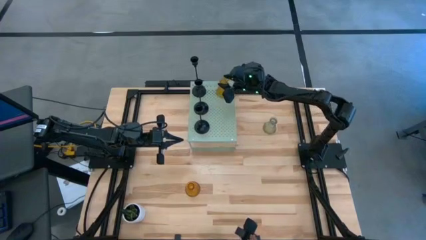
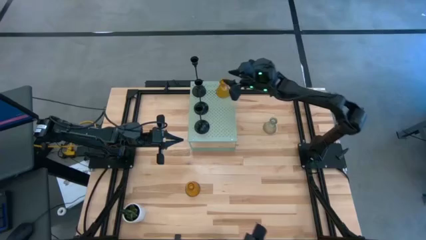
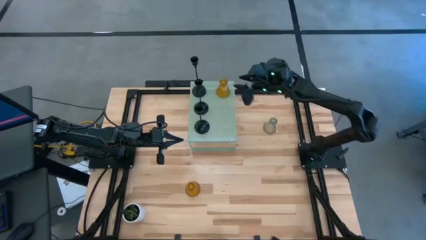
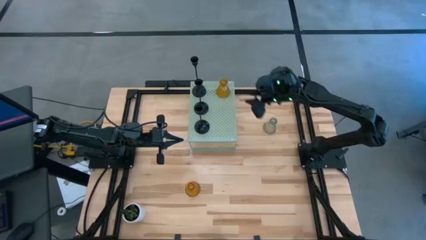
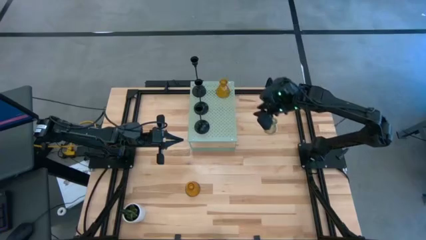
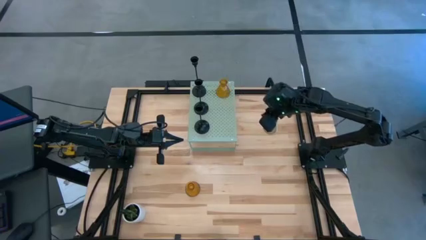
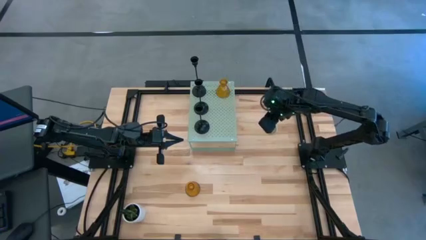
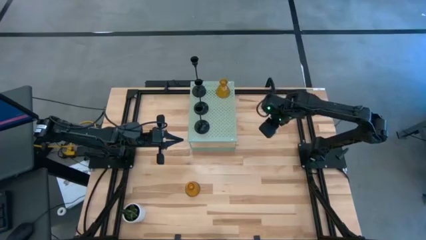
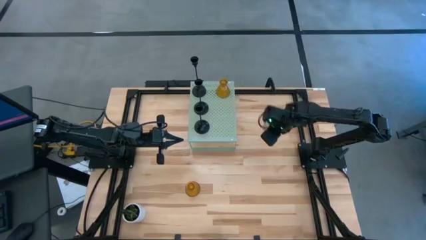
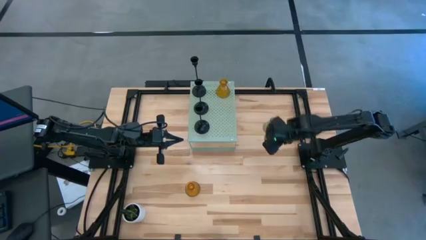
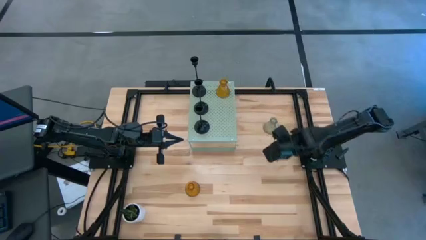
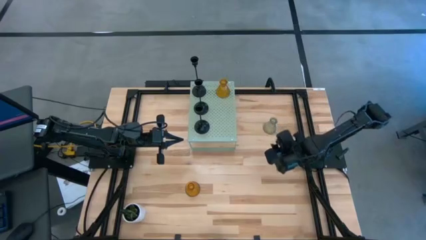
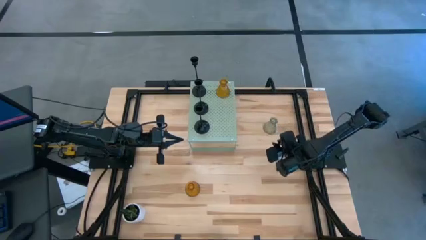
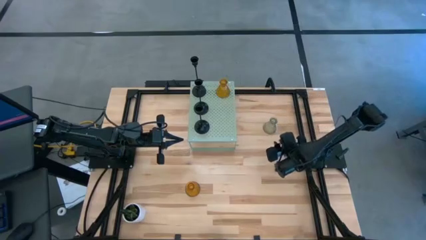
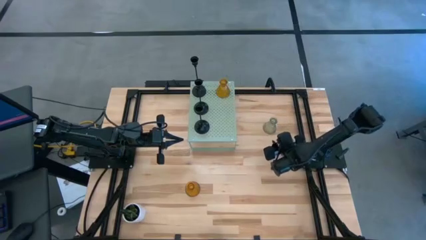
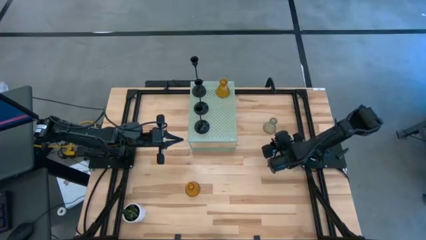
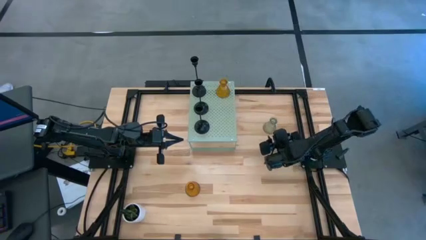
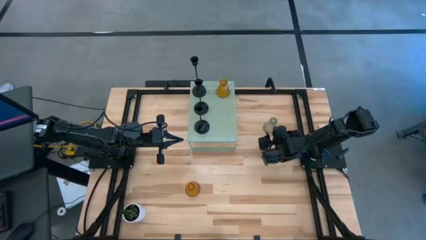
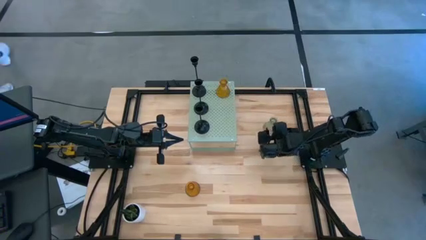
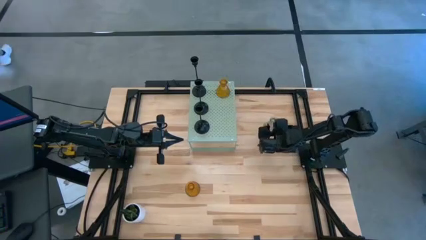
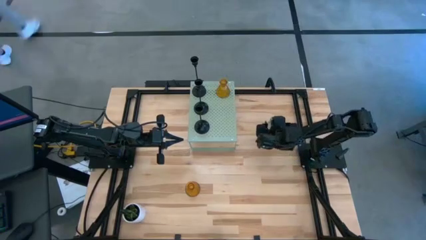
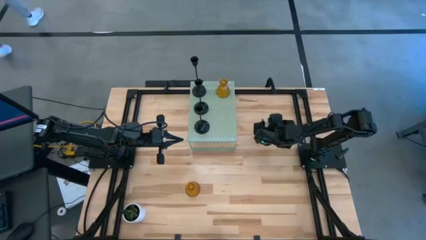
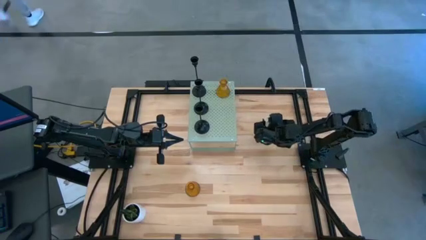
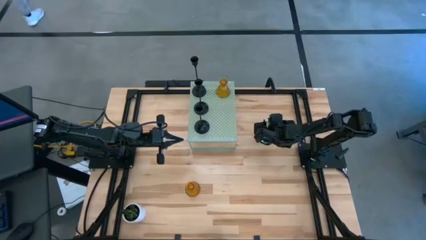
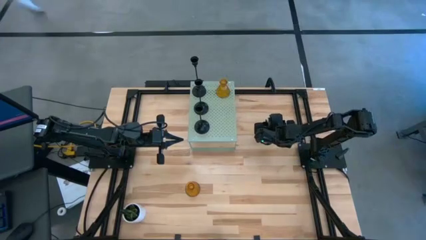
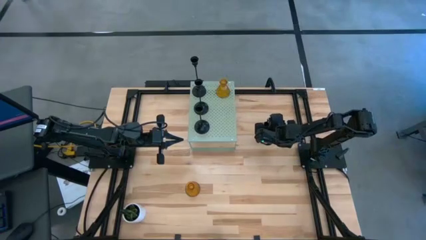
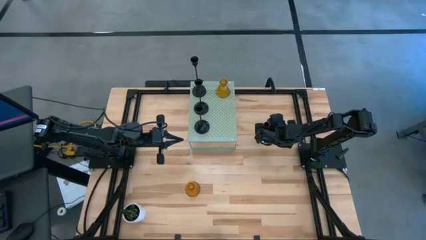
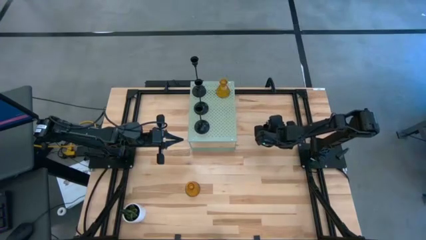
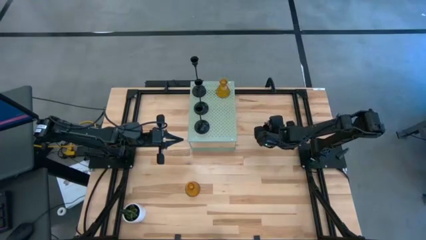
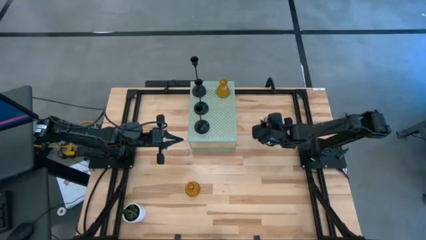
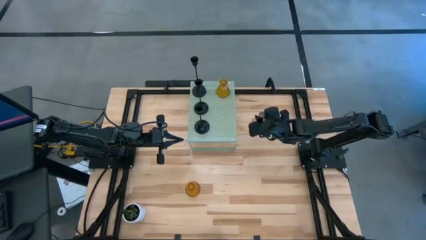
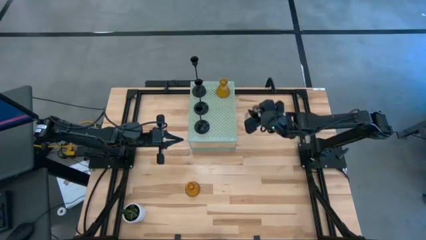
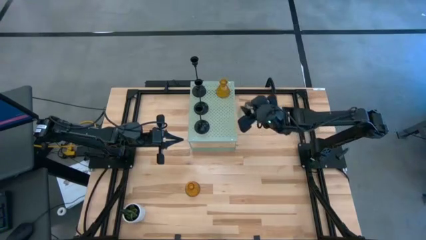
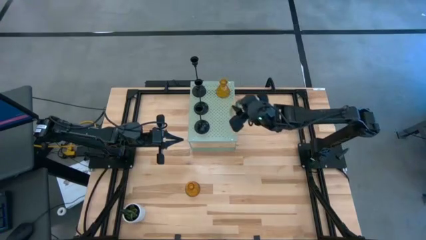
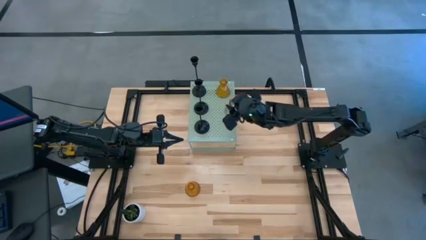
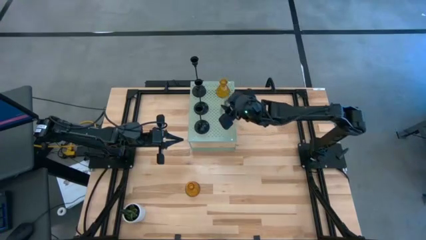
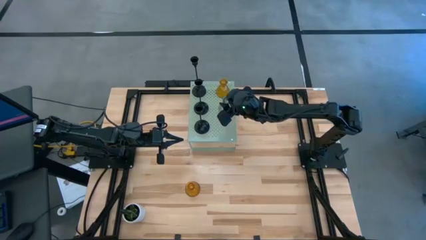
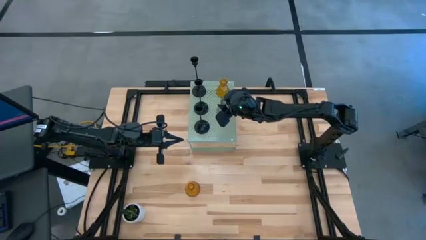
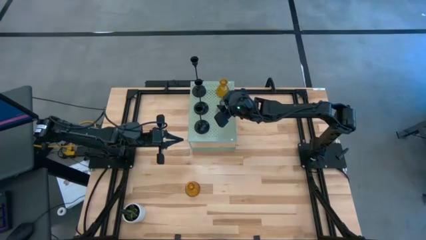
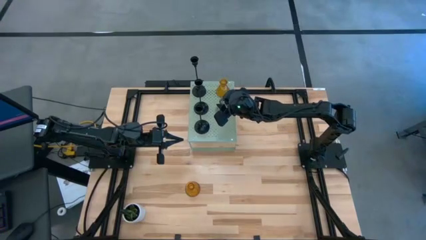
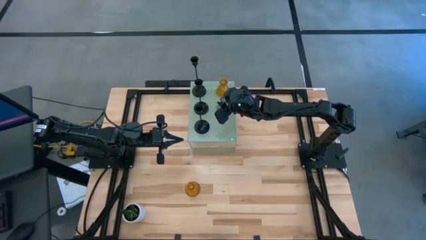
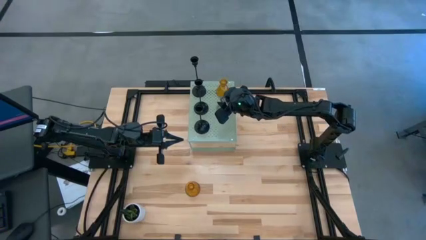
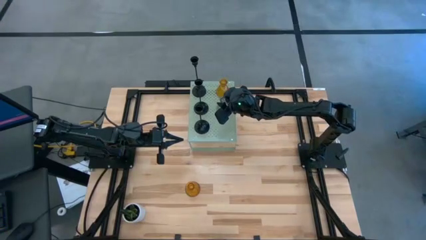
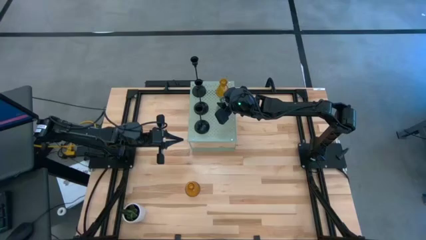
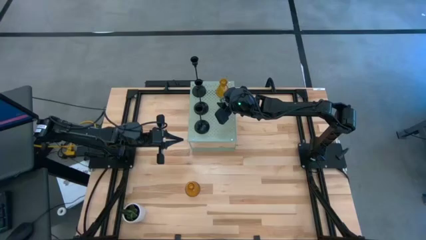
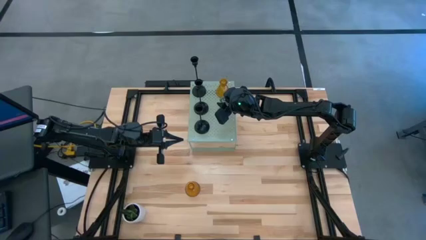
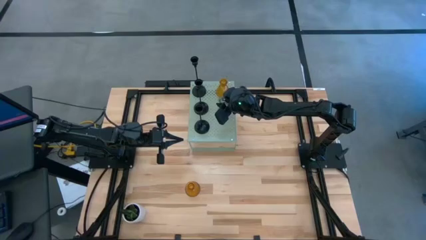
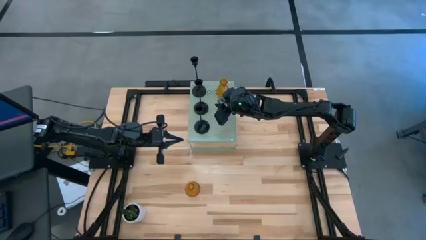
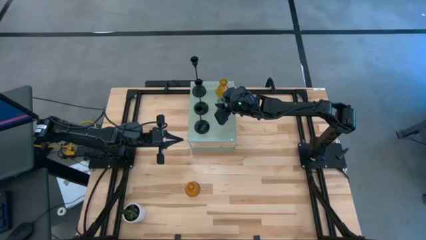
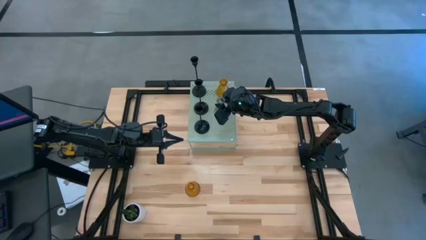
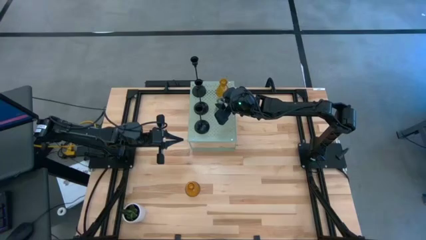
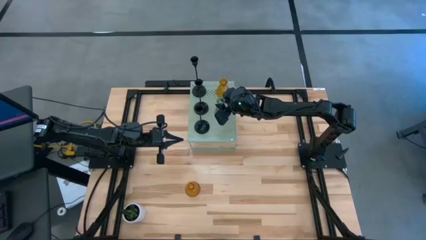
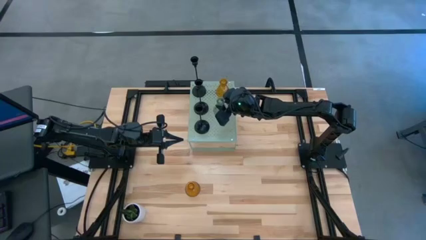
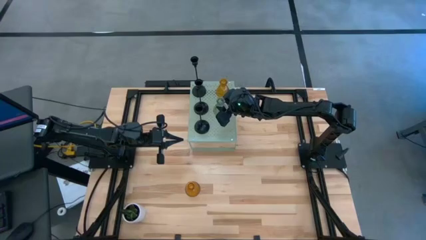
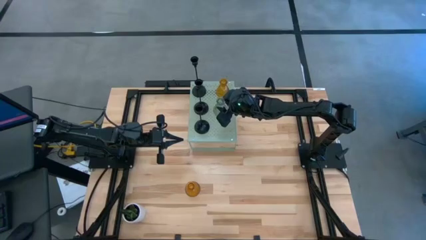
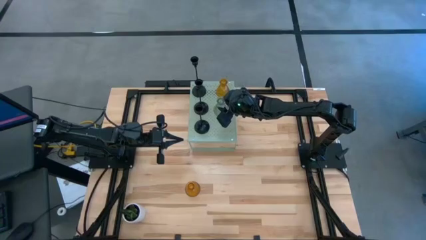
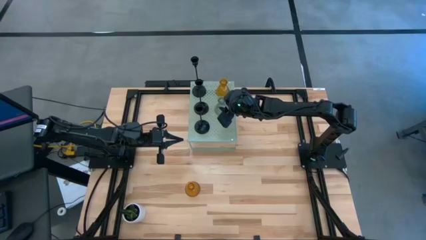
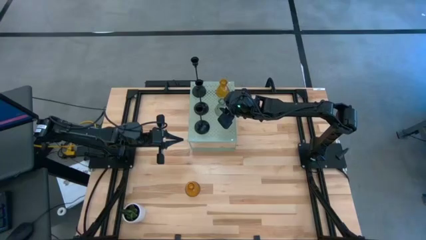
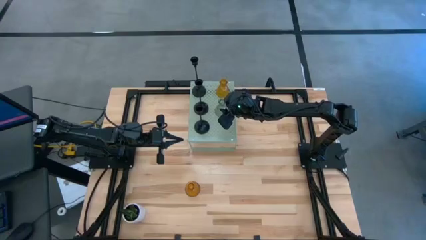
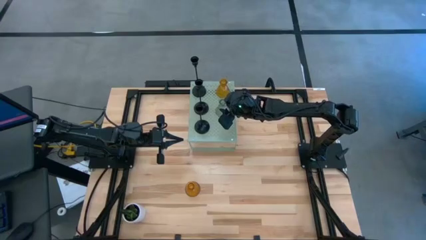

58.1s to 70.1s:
Task: Pick & Place candle stick holders
Put the green glass candle holder on the shelf aligned with the other yellow glass candle holder

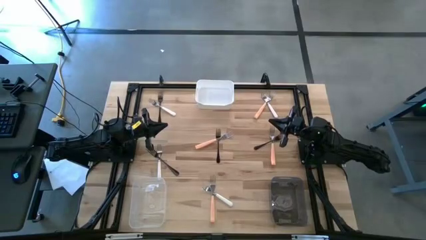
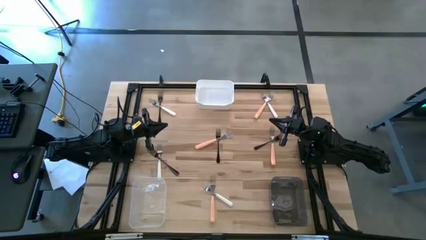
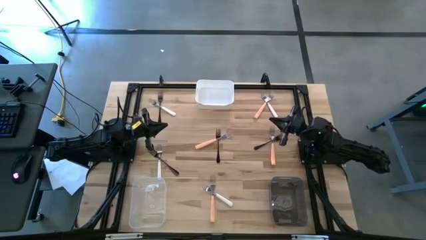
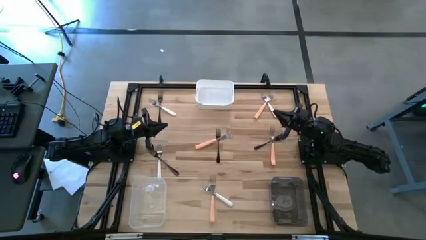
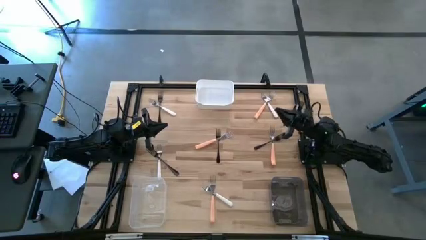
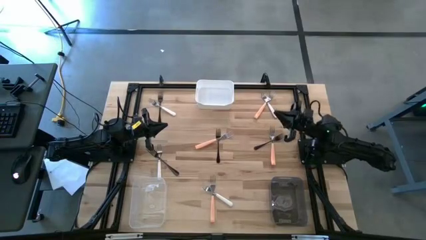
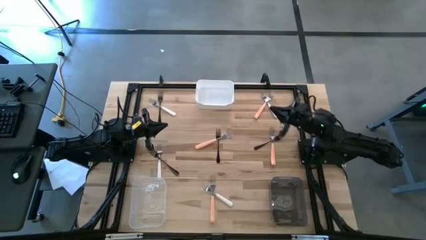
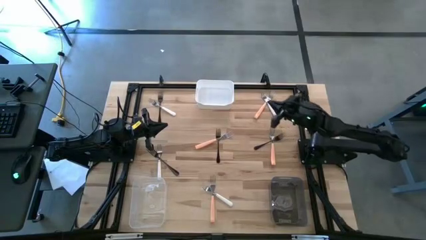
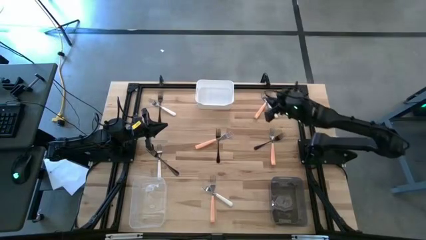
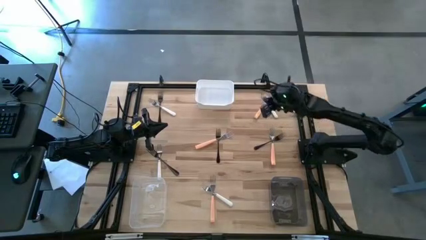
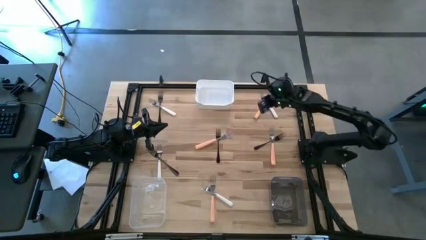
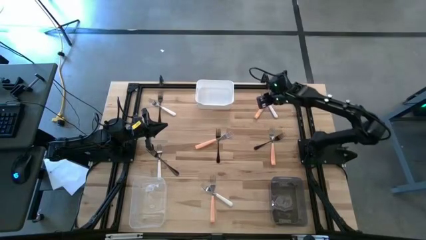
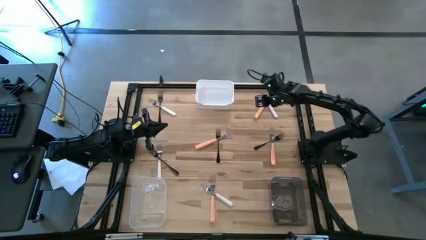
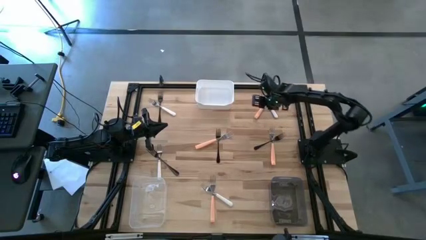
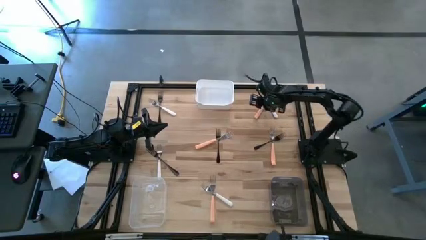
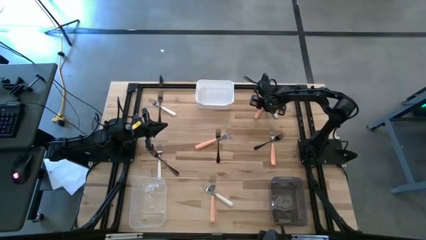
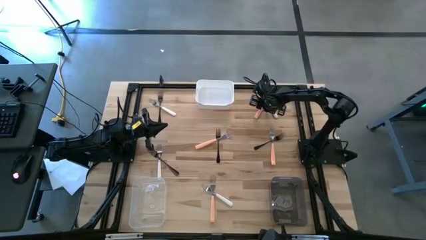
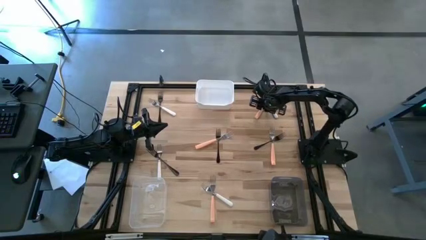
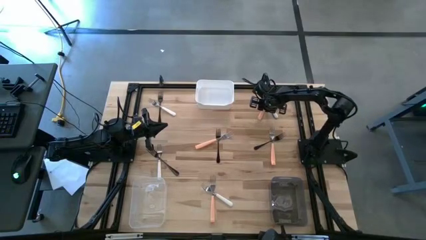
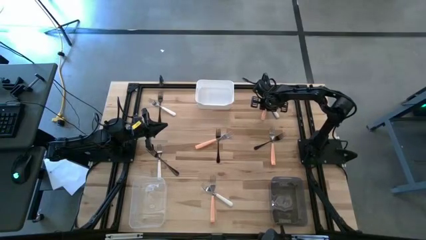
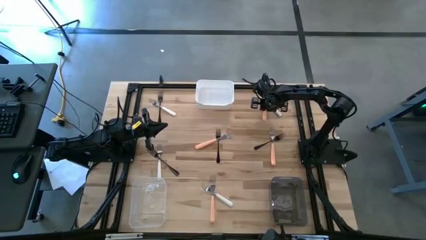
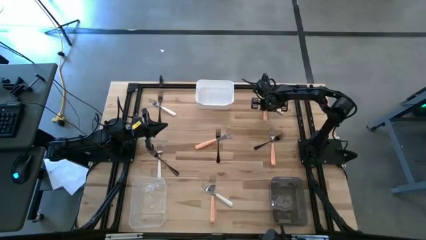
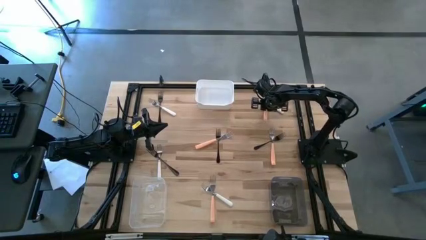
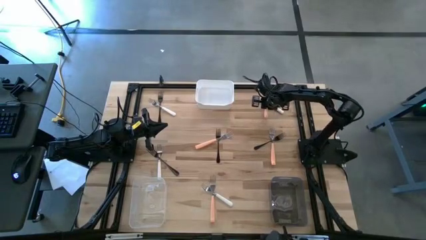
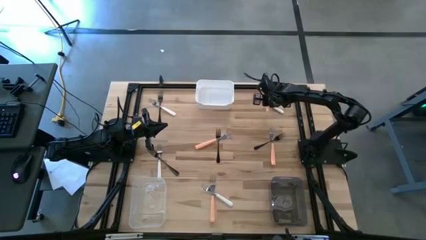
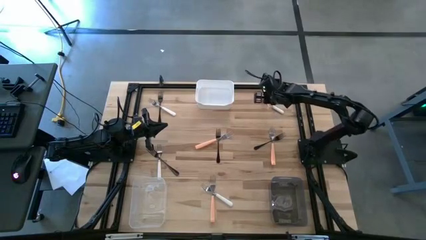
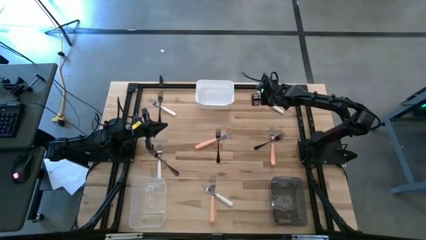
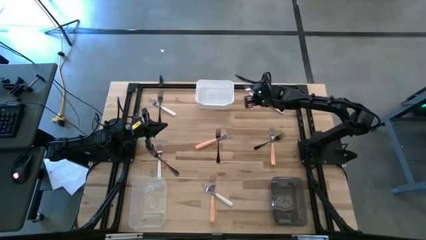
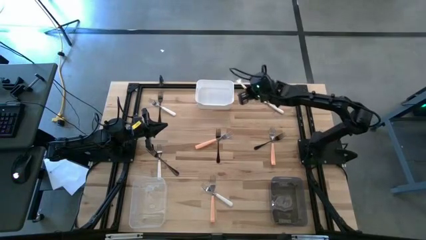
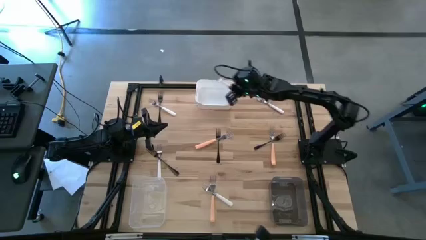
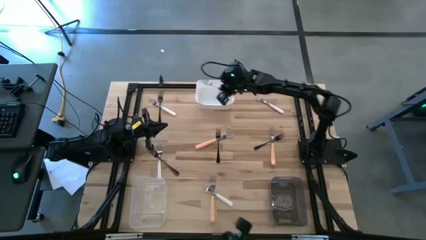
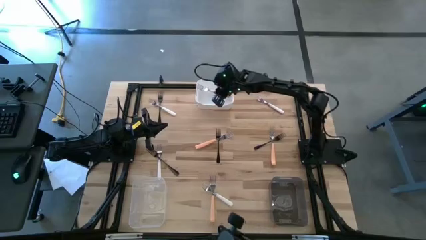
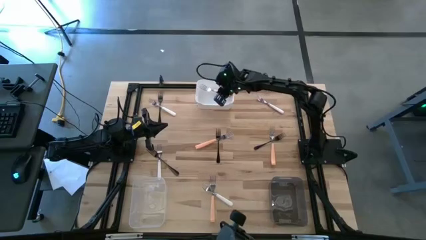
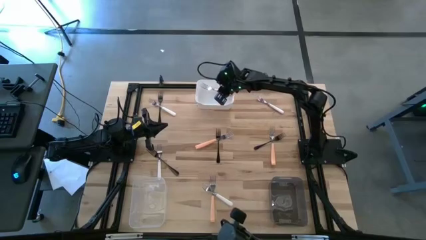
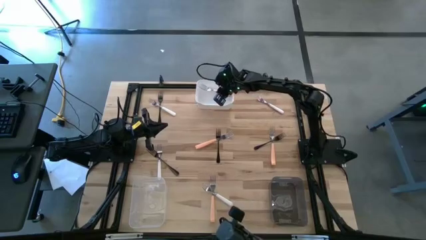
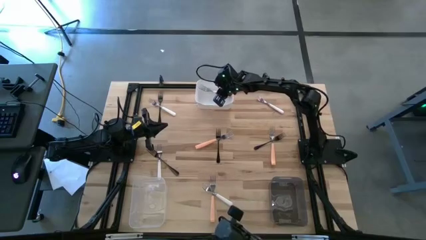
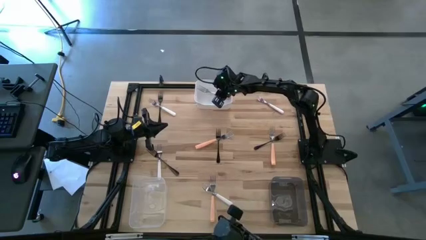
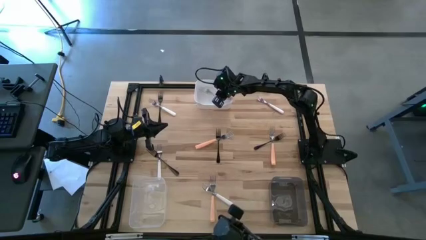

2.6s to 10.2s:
Task: Sort silverware by color (type)
Put the top right orange fork into the white bin
